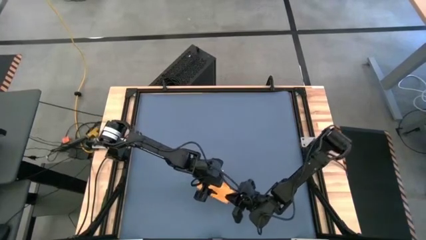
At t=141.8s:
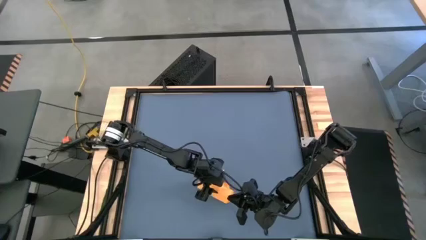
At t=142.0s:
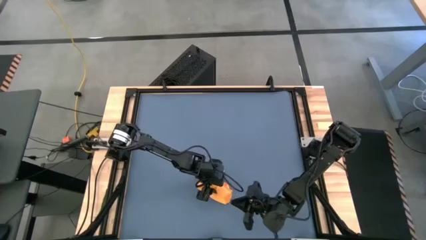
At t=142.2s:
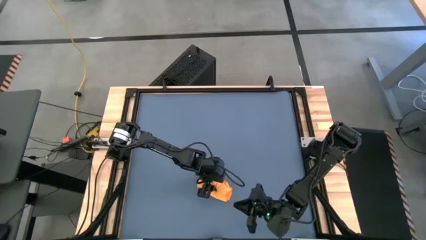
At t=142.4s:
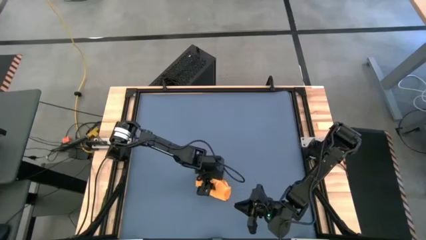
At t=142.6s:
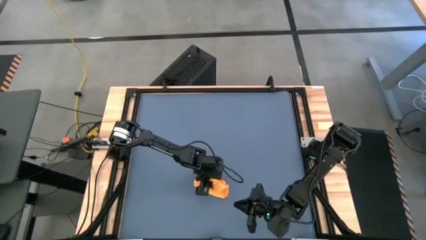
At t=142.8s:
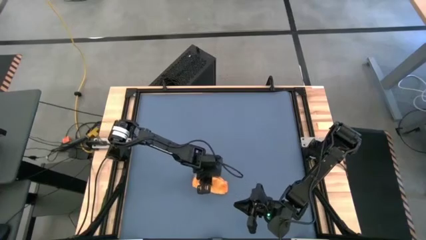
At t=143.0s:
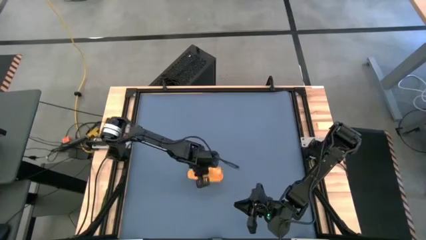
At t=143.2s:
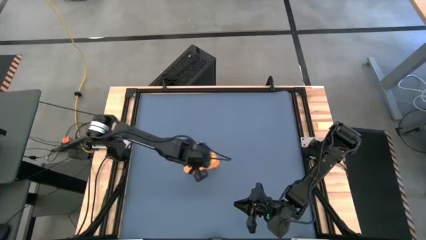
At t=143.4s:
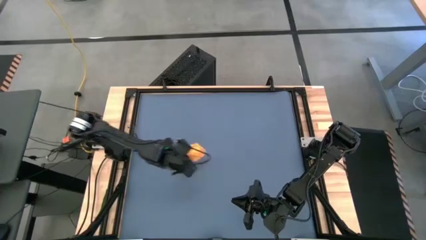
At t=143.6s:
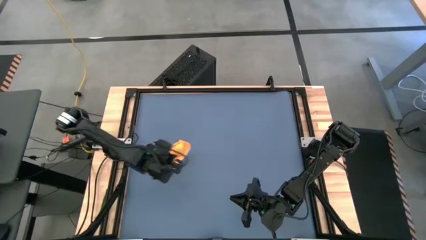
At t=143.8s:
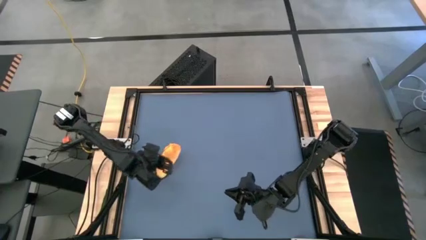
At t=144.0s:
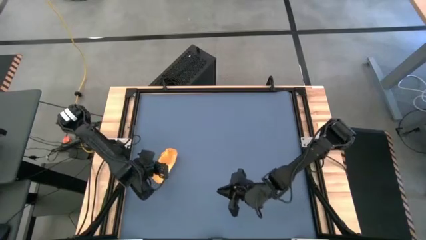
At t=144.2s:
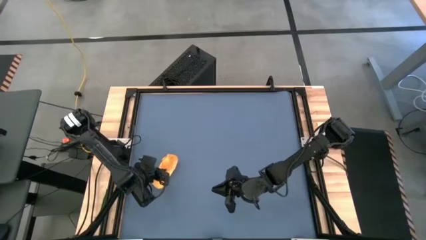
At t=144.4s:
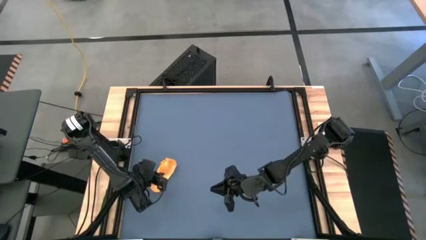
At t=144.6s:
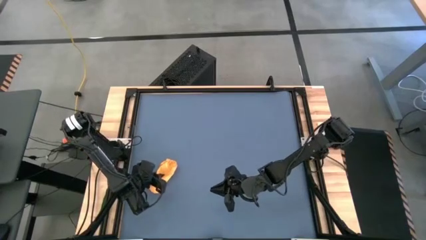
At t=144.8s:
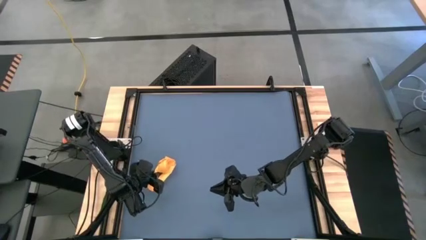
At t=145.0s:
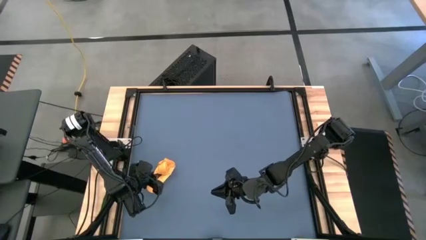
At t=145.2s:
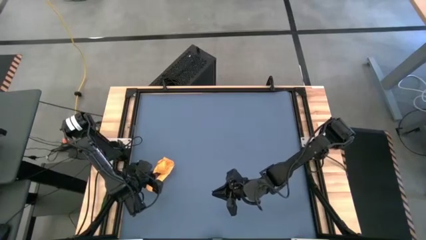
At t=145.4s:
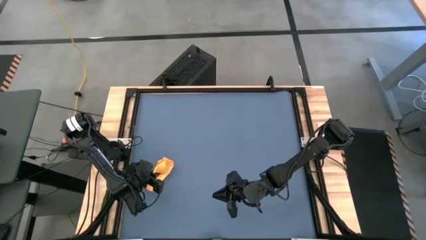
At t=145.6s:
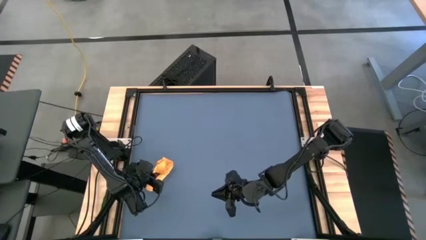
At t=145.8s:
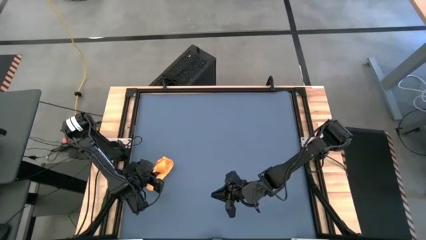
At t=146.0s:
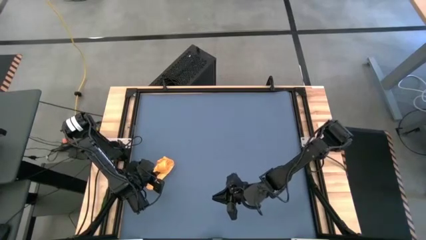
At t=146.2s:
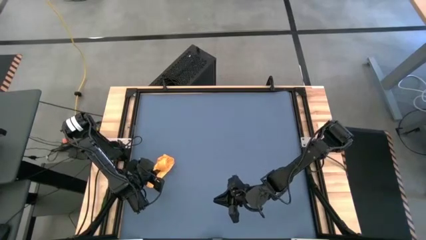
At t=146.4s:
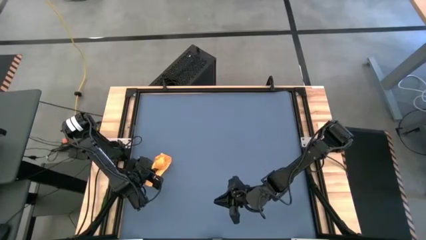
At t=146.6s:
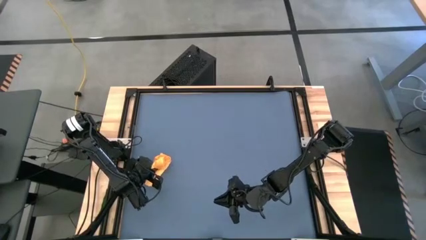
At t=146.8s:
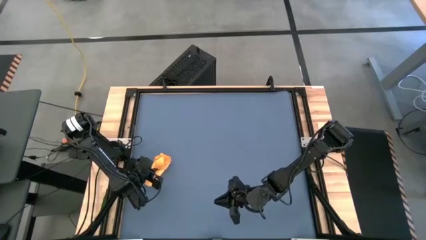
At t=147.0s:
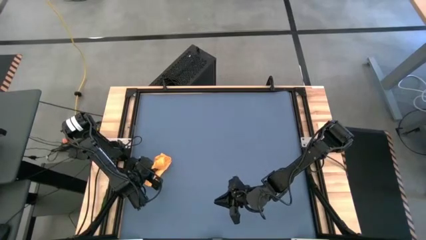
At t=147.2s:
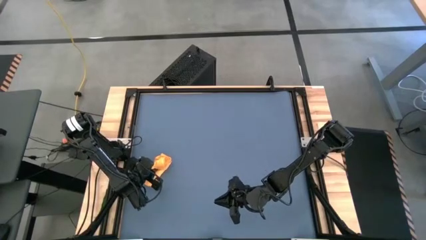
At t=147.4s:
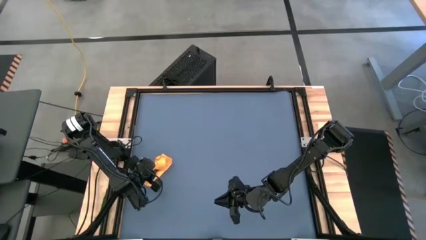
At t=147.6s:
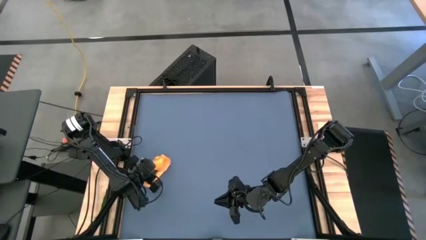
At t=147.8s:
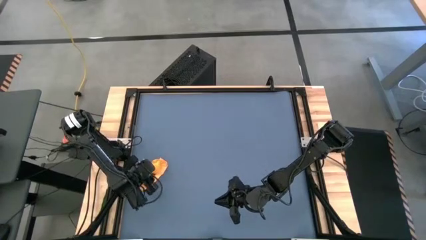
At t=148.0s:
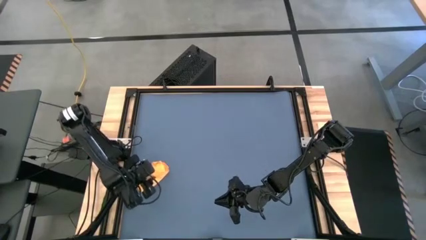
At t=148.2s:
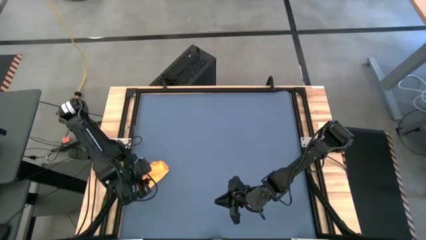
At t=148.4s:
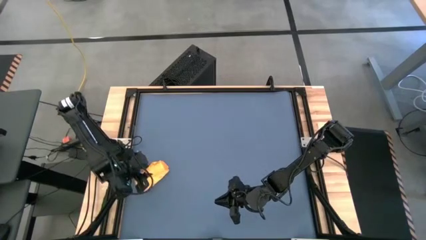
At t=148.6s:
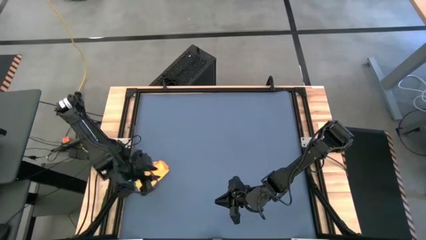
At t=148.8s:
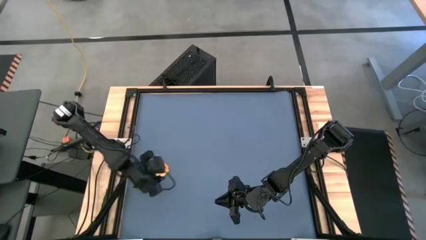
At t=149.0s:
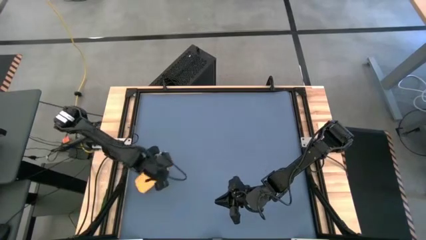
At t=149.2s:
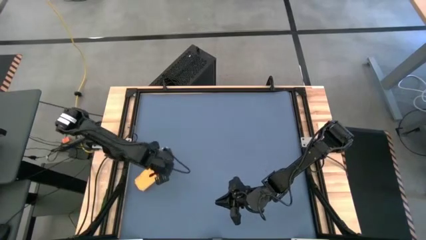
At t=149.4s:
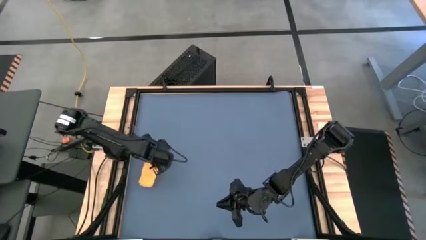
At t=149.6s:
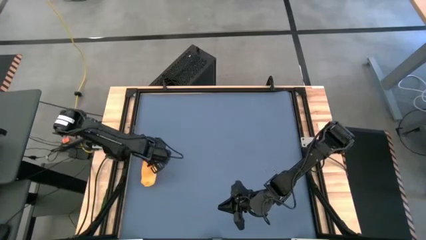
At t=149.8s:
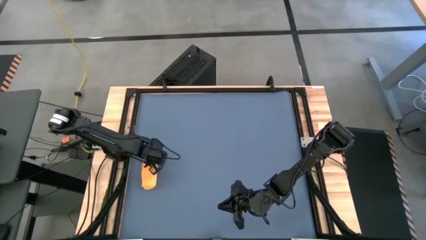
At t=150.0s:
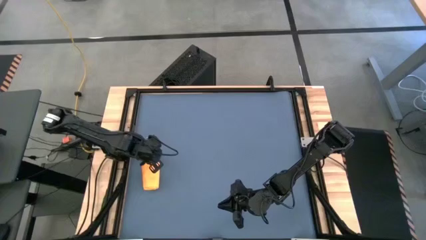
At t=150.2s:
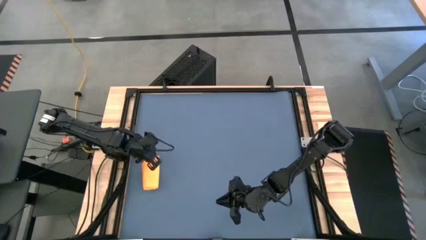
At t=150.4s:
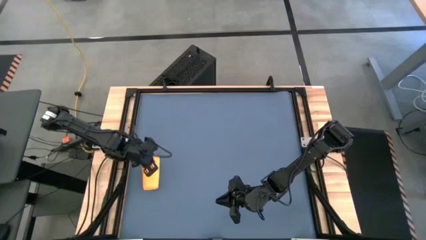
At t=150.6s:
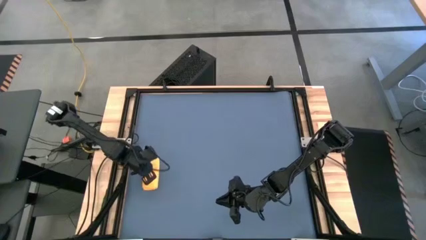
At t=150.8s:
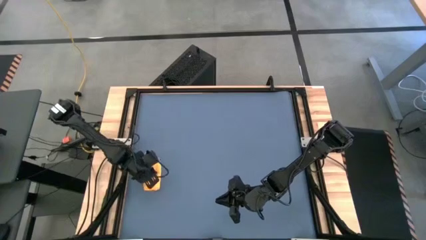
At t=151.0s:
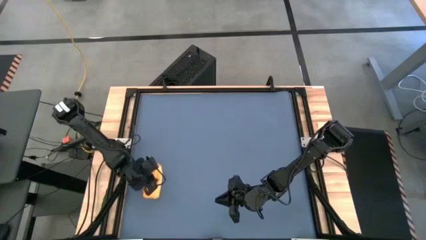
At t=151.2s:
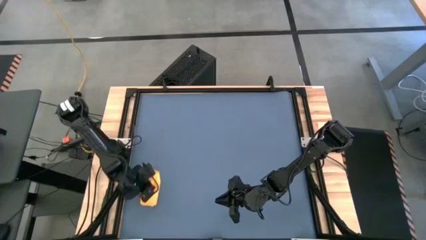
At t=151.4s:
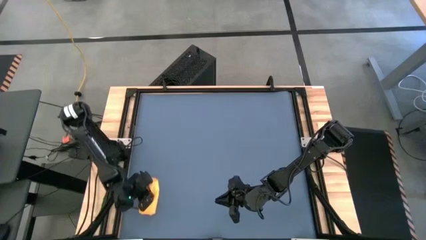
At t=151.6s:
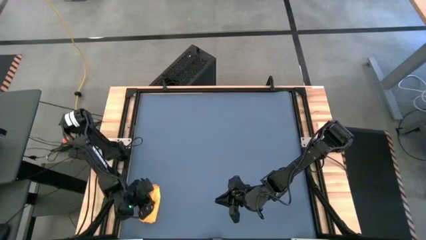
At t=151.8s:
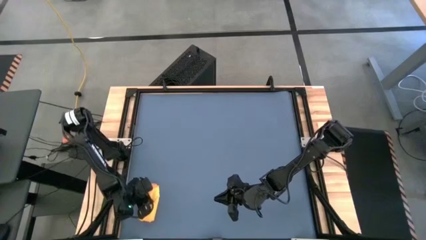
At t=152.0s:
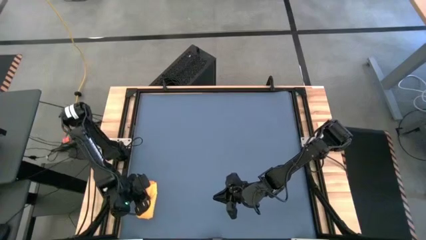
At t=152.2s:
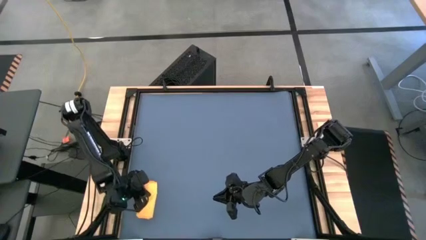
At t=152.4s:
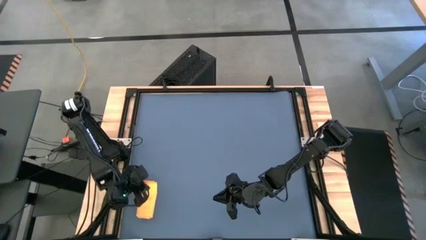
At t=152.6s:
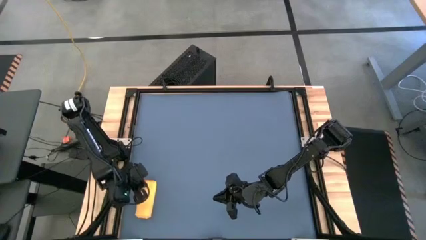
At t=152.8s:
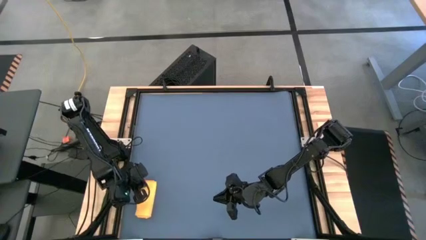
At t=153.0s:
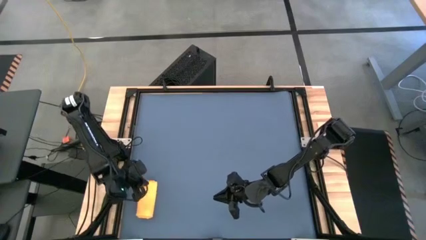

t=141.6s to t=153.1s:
Task: Roll towel
Move the yellow towel to the middle left of the table

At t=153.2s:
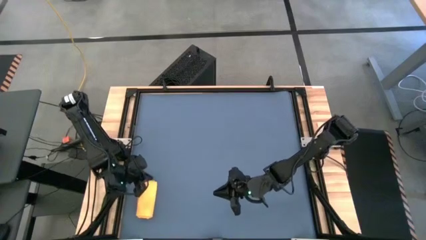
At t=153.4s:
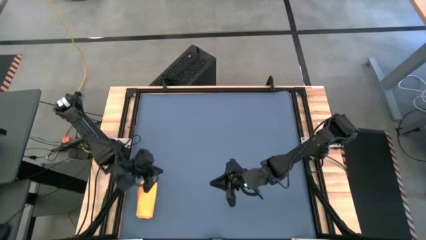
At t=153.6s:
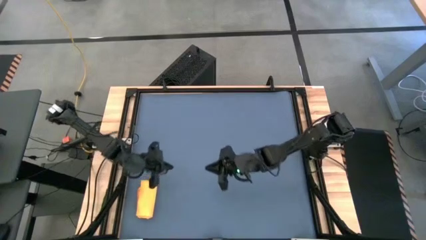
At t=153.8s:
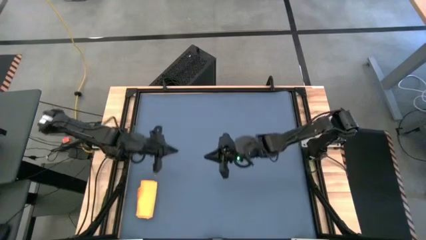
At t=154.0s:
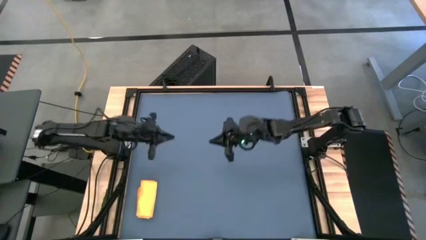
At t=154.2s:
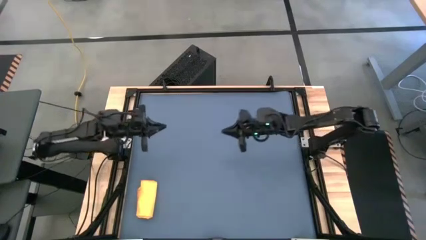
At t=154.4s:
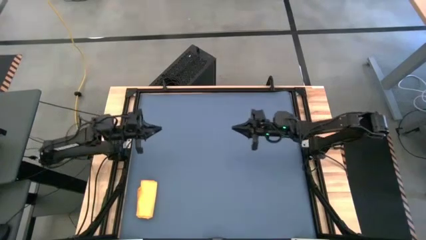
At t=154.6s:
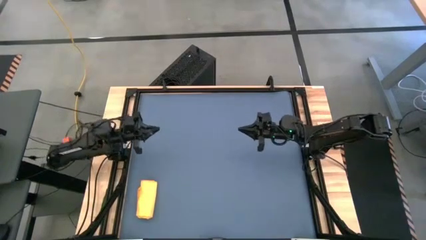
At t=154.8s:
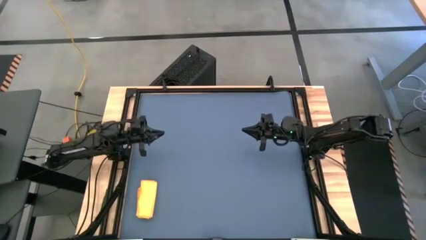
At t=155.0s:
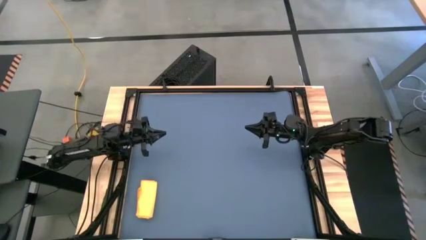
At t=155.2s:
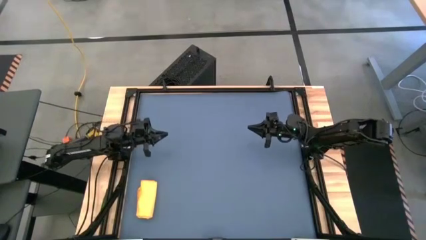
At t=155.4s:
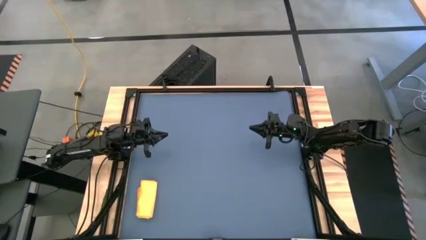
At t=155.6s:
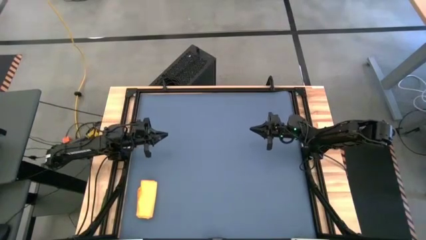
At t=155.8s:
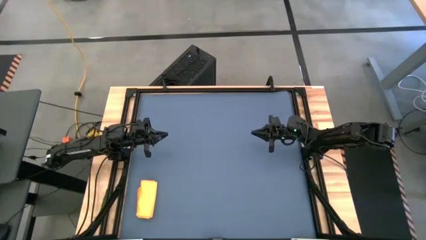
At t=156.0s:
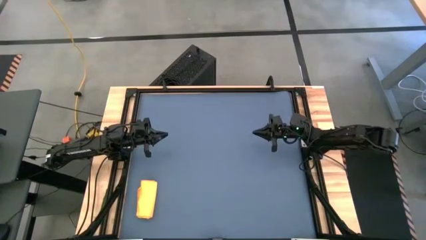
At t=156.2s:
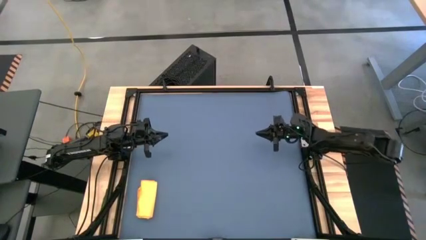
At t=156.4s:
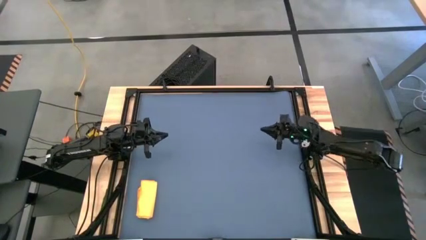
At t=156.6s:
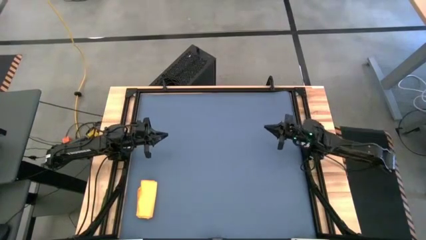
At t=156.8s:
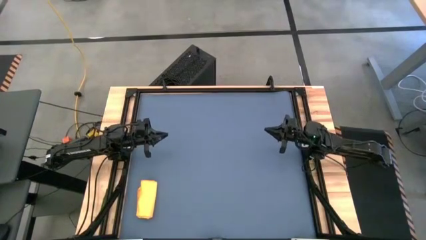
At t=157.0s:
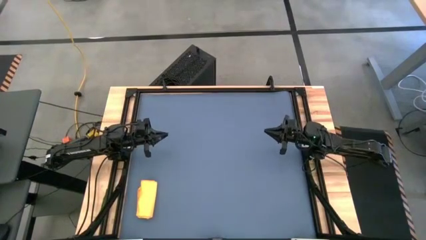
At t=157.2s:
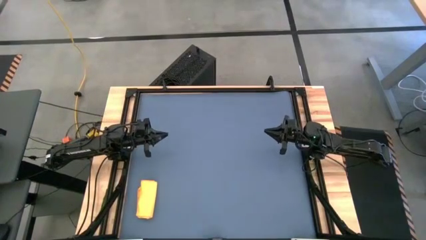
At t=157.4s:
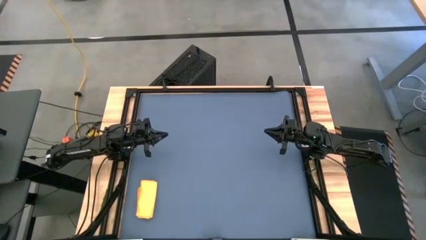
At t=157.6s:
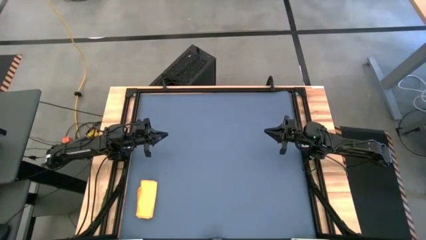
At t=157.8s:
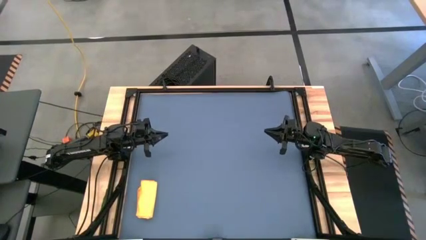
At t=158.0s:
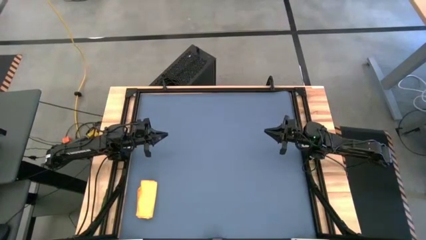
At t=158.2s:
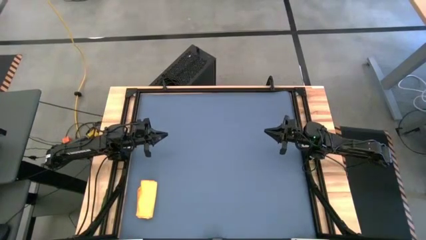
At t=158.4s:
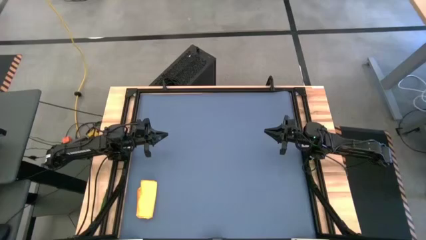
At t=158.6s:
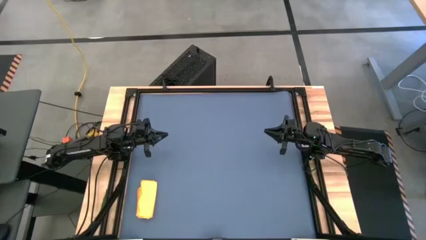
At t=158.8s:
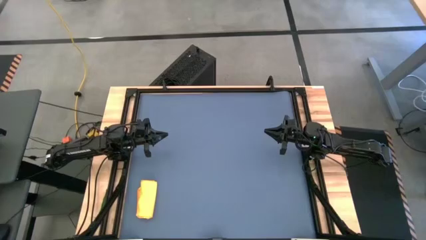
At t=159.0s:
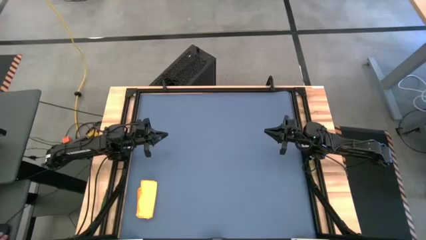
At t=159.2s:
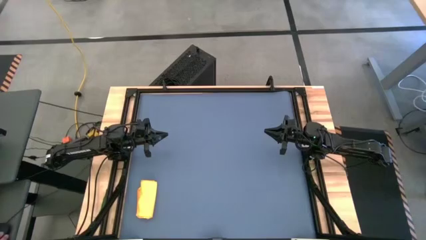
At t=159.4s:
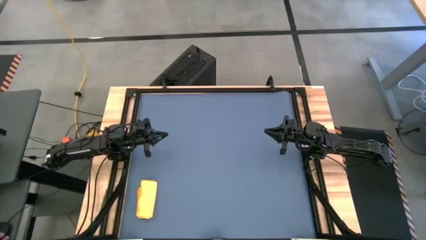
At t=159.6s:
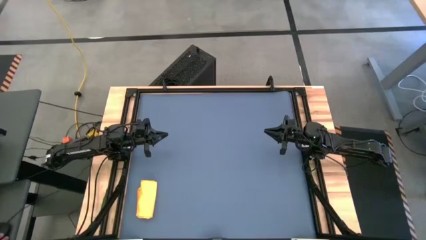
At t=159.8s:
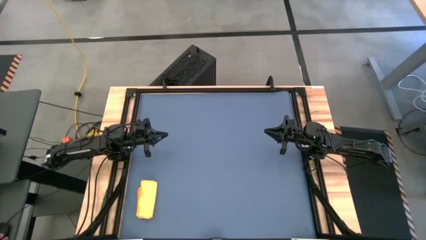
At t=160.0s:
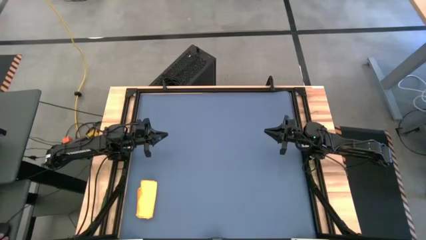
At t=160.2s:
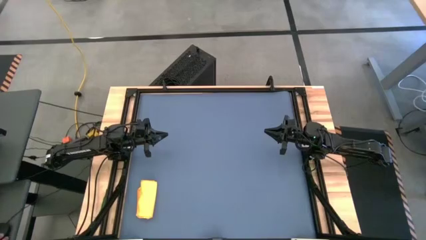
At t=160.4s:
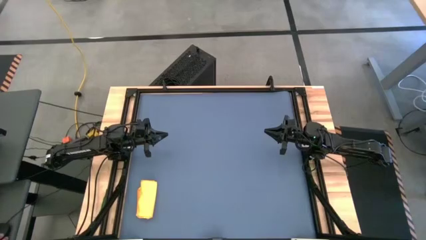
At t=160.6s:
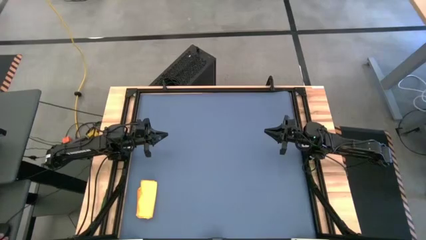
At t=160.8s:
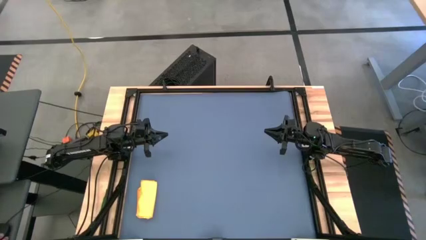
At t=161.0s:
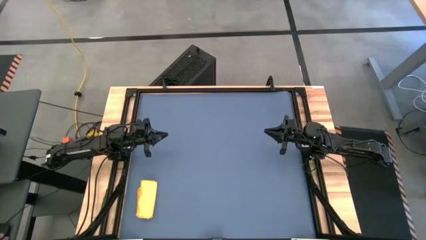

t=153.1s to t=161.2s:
Return to Home Position
